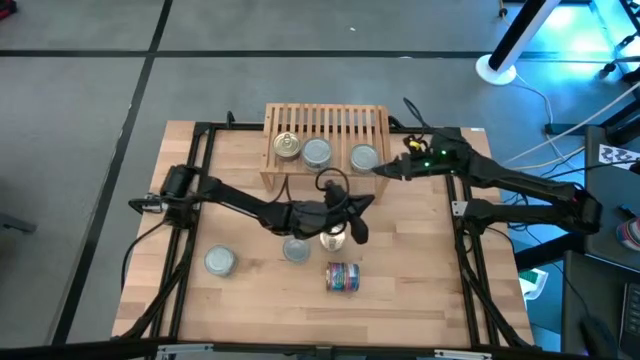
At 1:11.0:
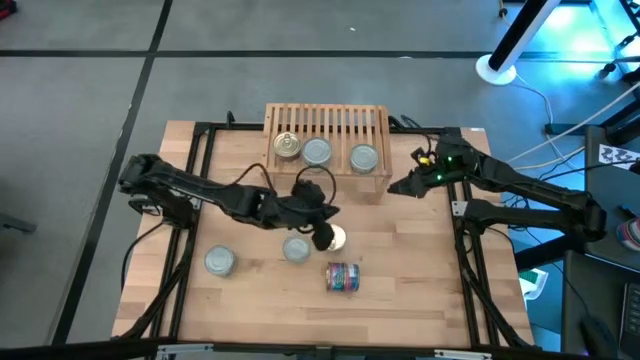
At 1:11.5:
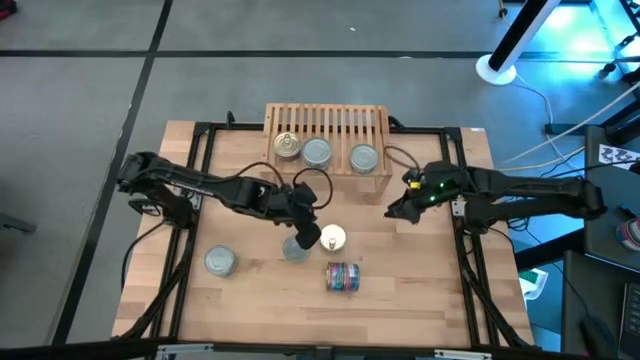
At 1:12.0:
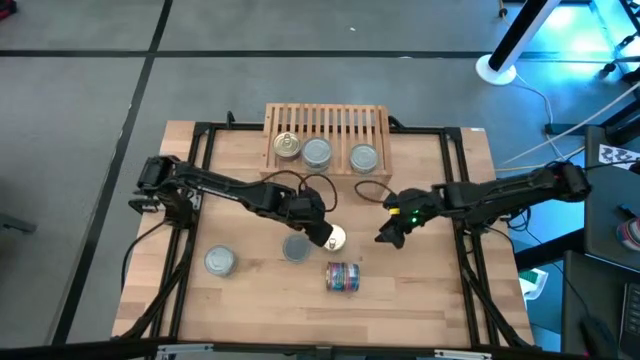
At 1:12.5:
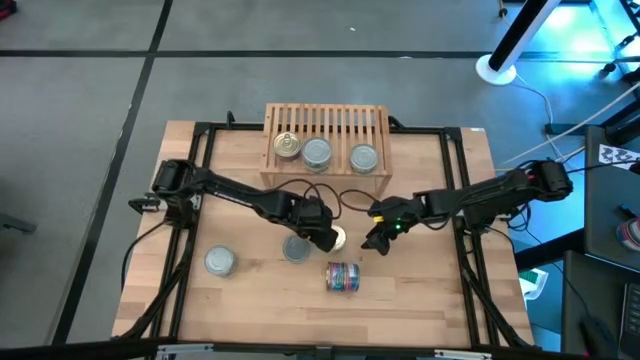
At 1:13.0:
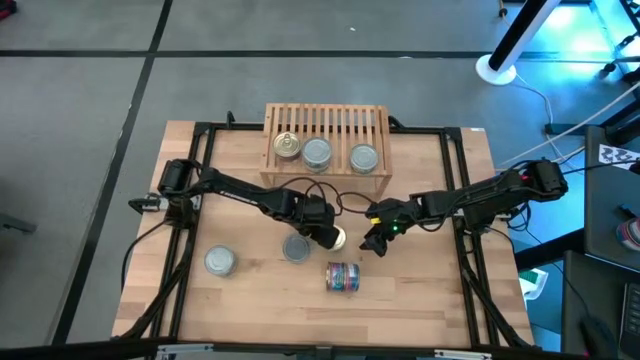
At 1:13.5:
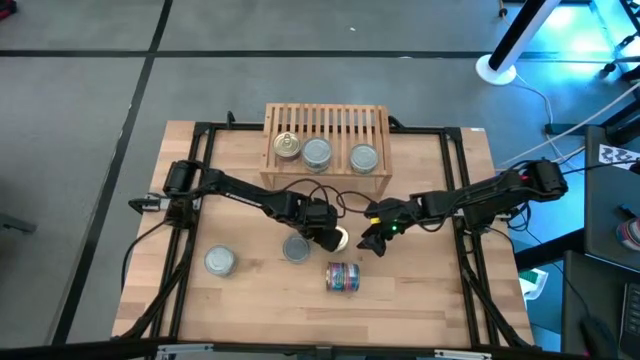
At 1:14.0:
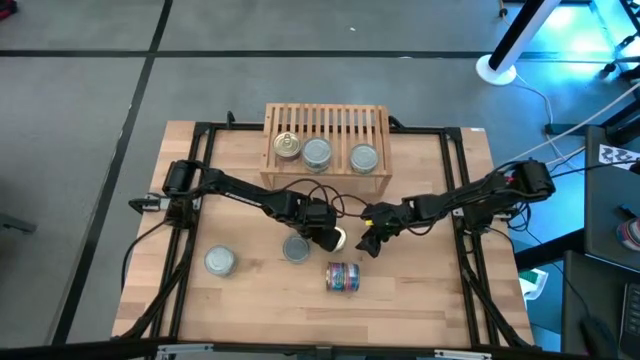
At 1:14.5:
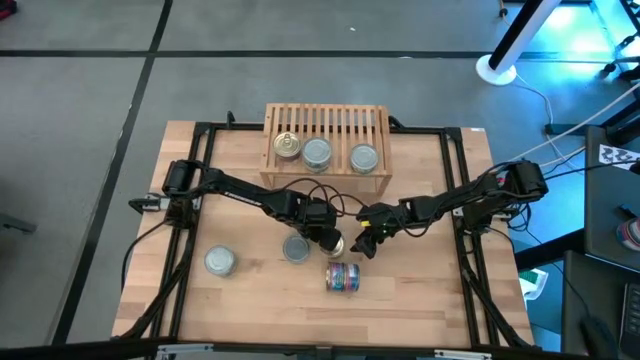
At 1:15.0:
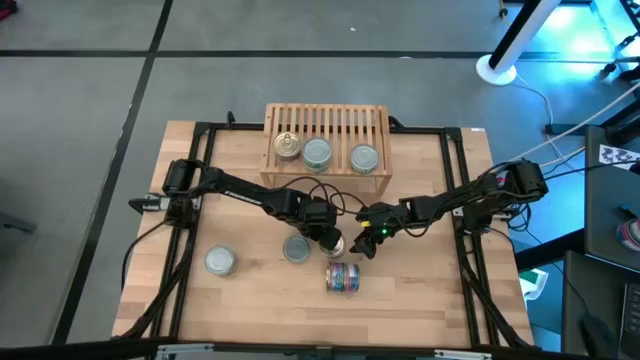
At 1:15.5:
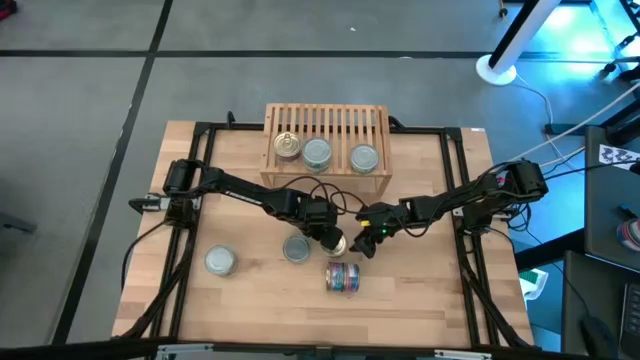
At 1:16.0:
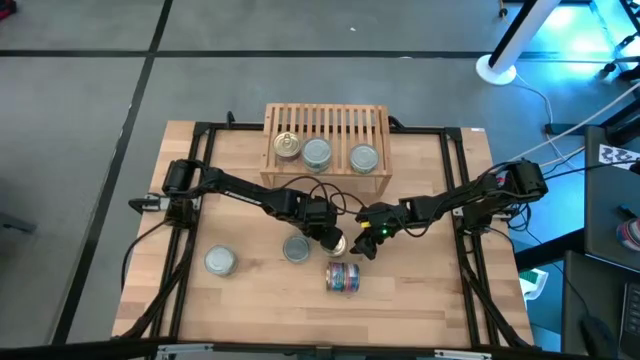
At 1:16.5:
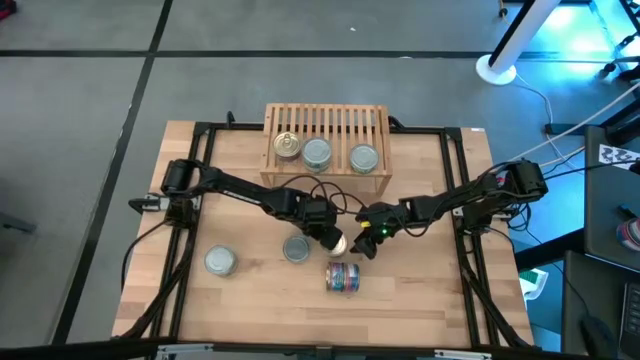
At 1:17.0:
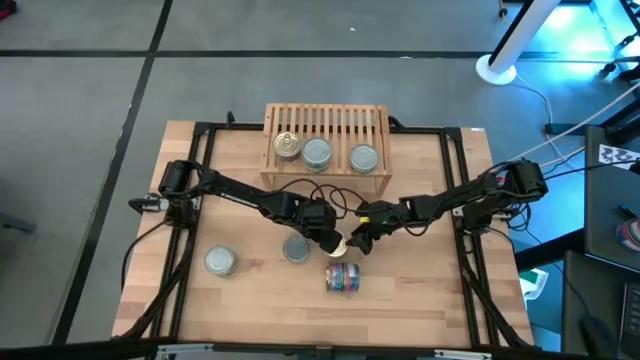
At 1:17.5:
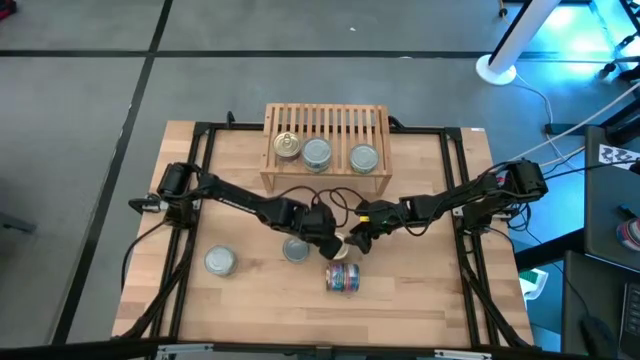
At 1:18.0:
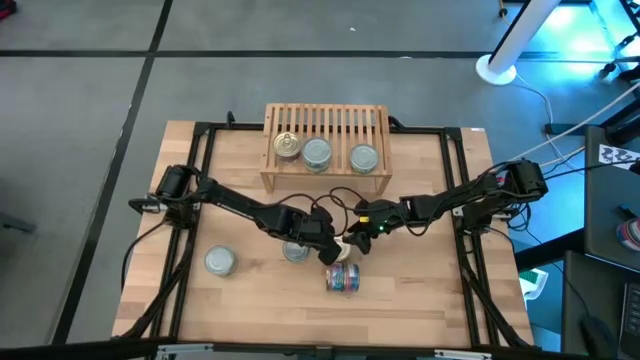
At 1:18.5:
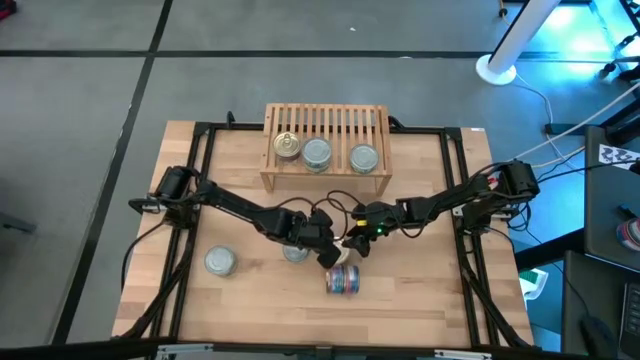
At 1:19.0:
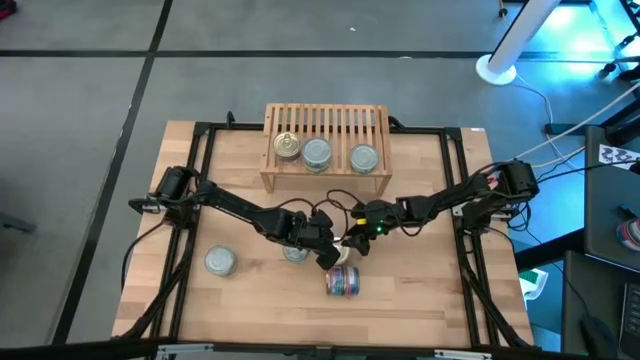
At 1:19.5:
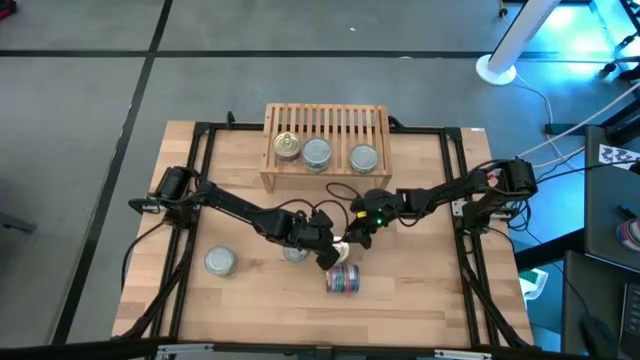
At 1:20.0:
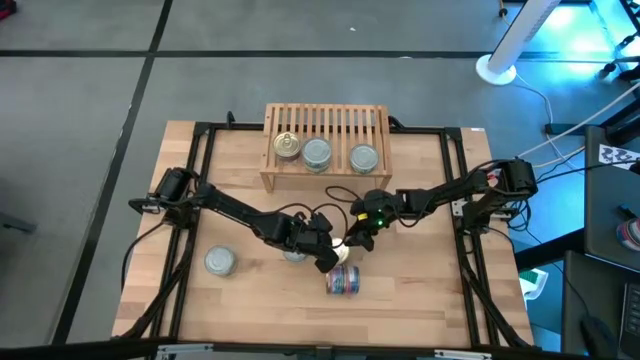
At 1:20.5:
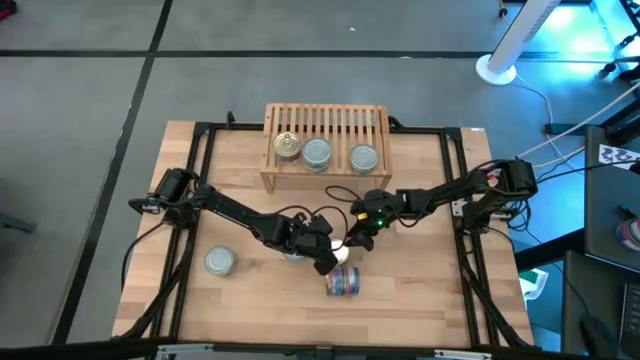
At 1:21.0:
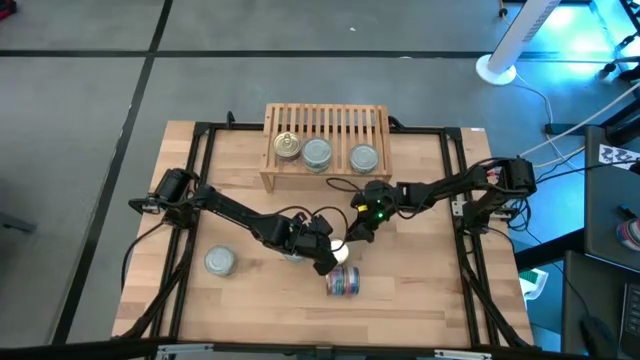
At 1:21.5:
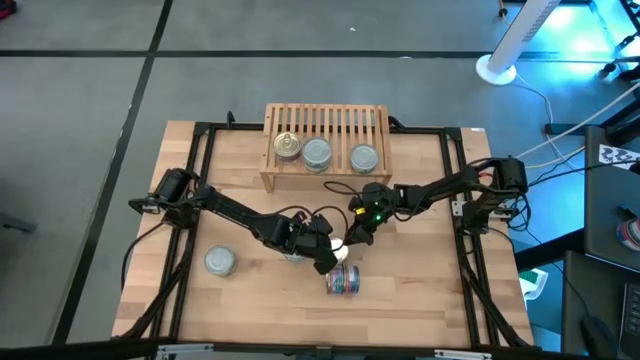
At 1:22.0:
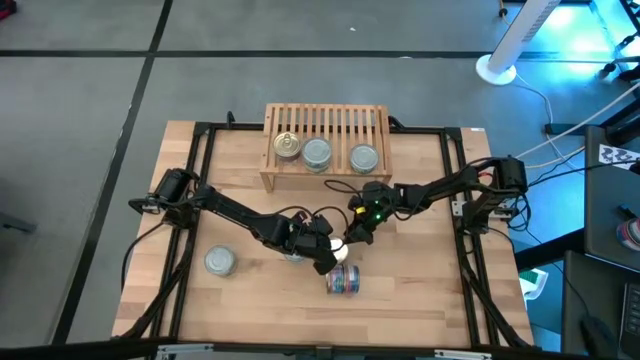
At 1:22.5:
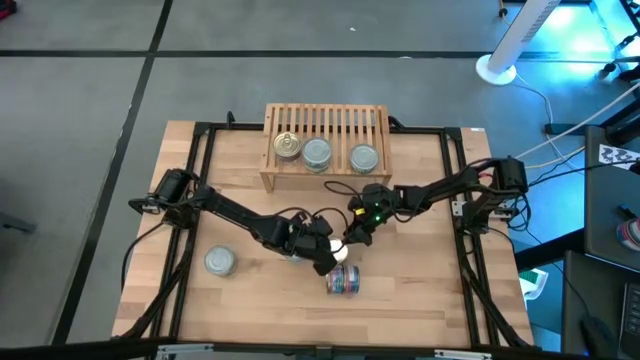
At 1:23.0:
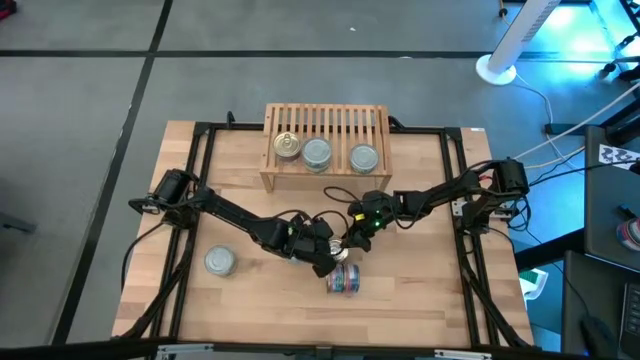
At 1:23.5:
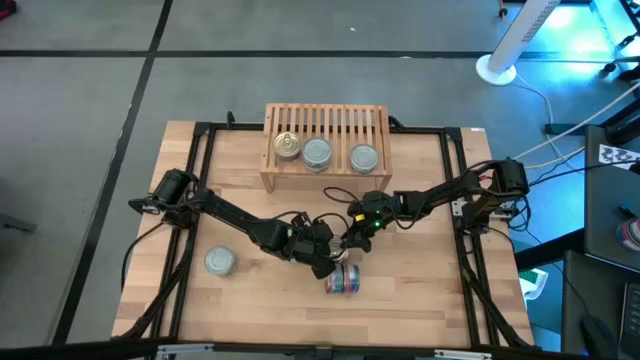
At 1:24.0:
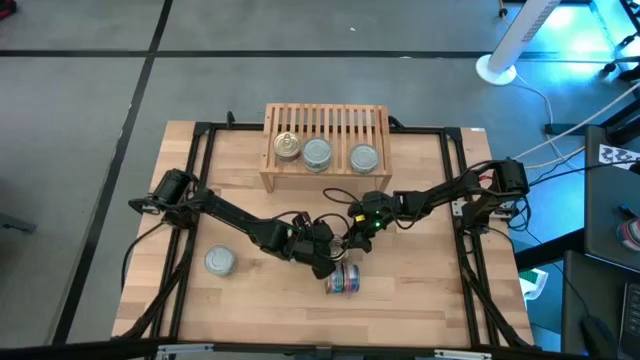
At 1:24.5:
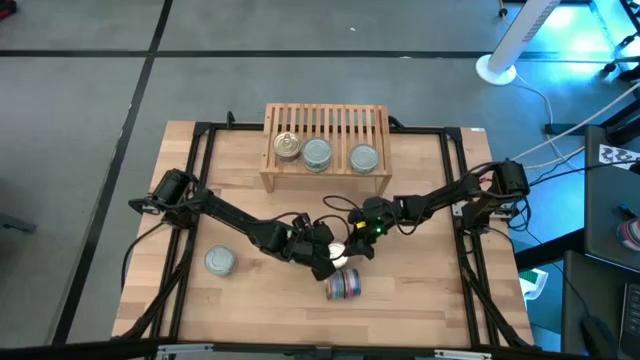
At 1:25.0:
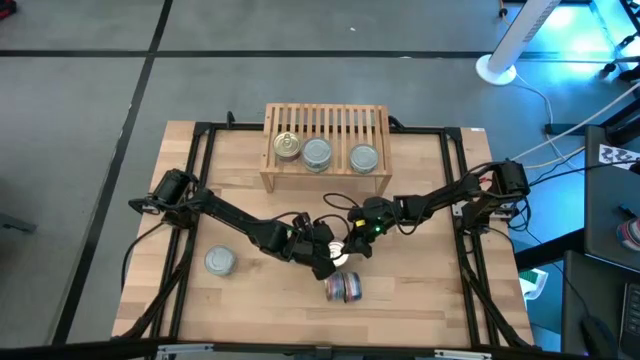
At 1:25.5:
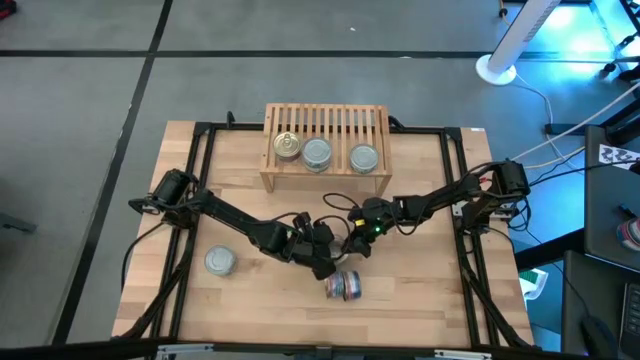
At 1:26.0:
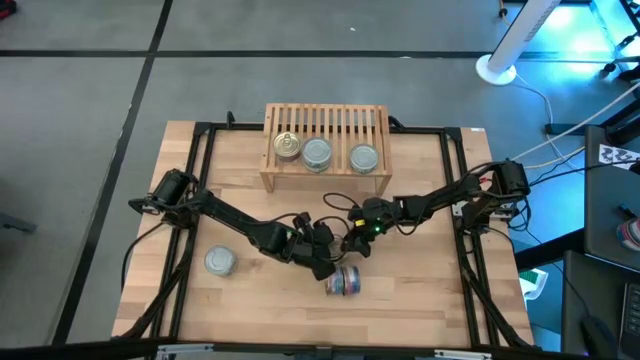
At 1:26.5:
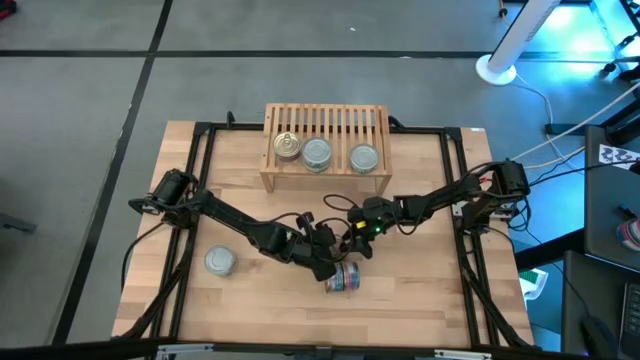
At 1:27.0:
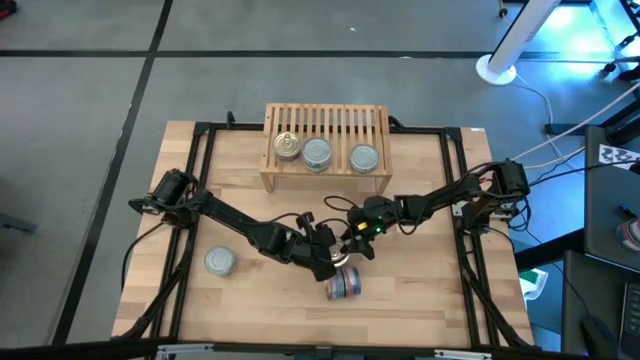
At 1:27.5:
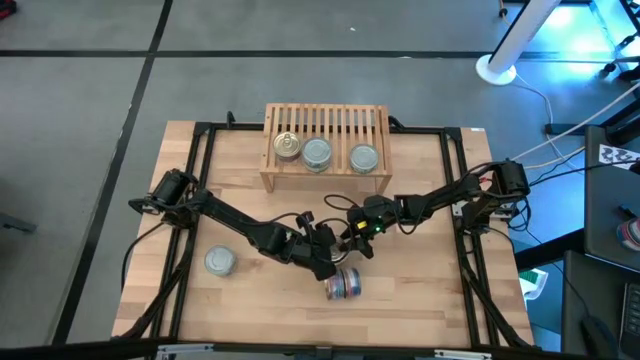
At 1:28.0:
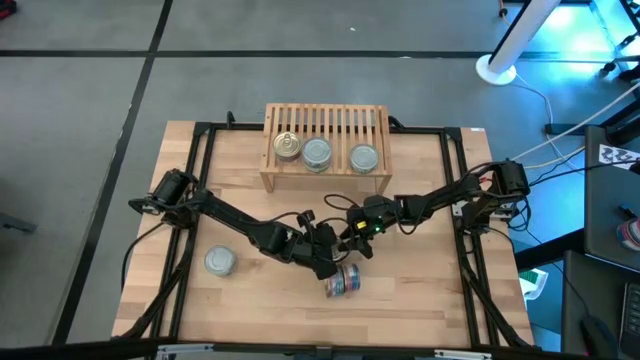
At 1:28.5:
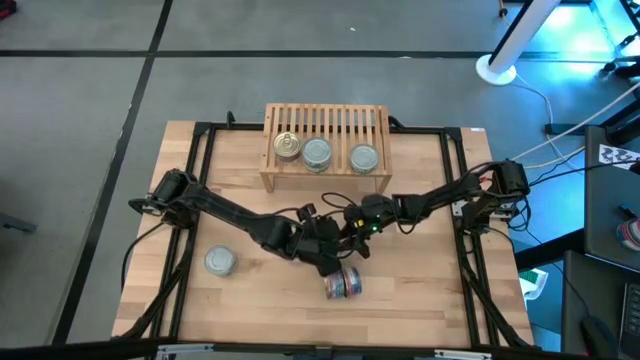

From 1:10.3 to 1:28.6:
Task: Stack canned seafood by type on shelf
Stack the blue-pink tuna can on top of the other blue-pink tuna can on the shelf

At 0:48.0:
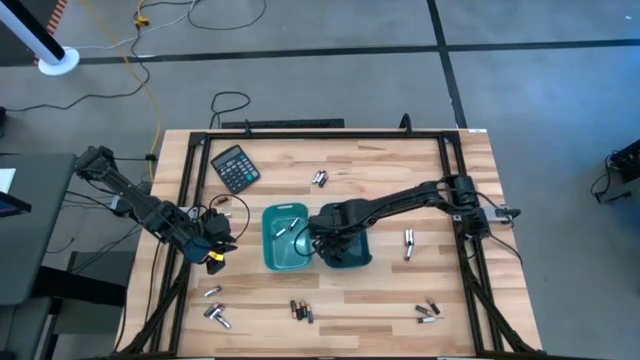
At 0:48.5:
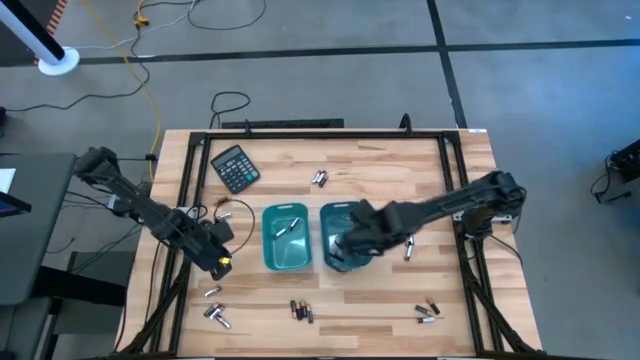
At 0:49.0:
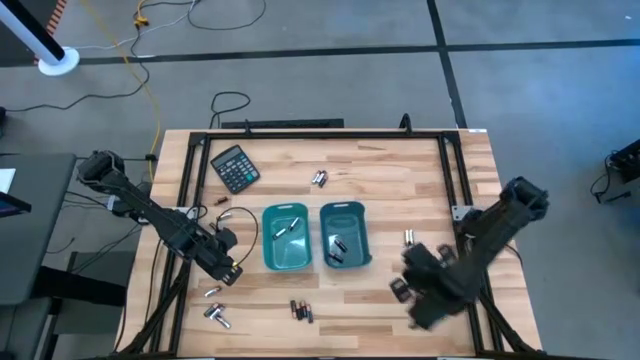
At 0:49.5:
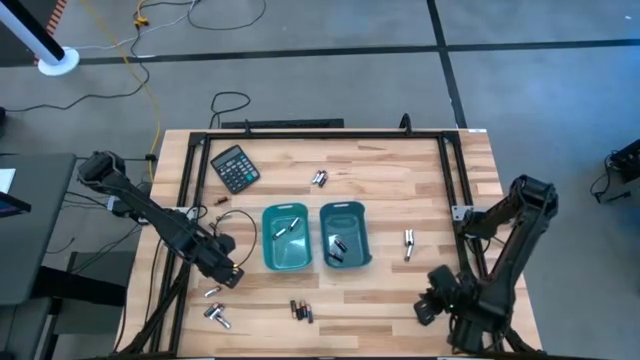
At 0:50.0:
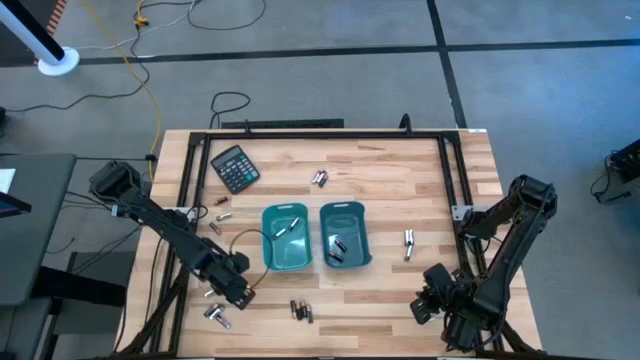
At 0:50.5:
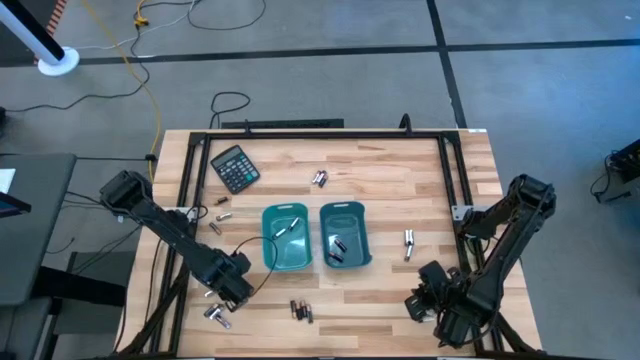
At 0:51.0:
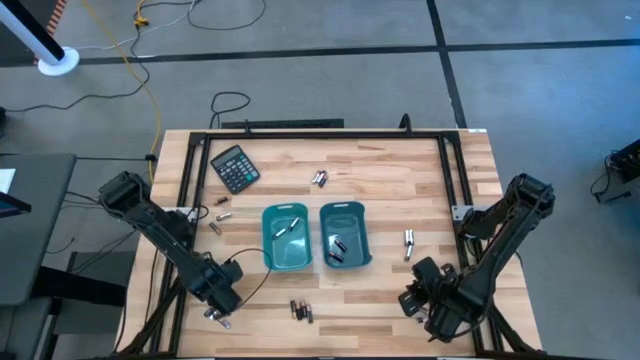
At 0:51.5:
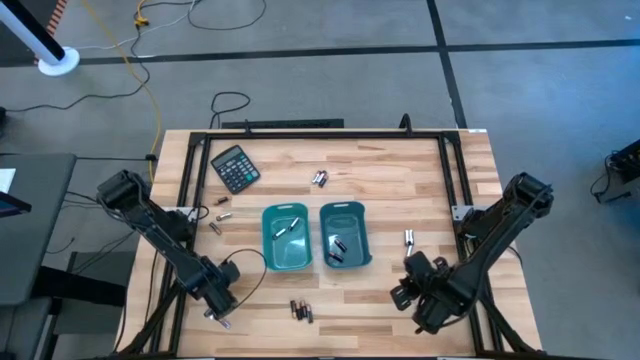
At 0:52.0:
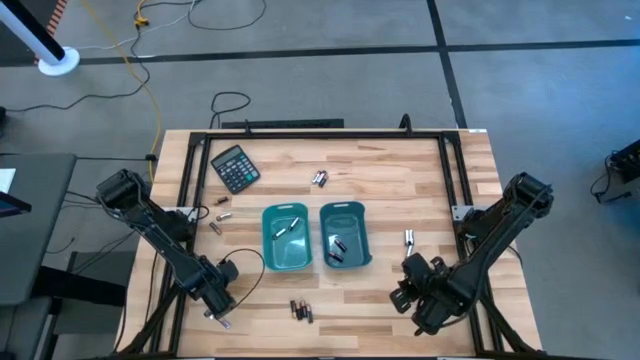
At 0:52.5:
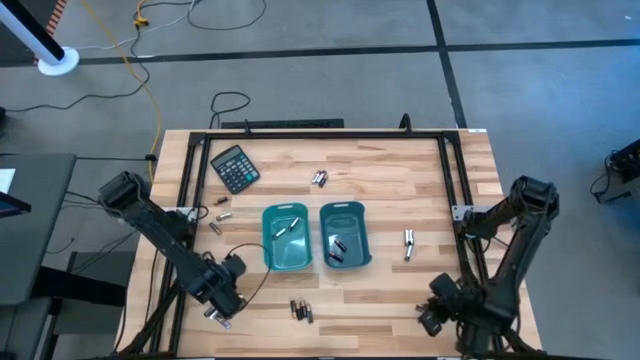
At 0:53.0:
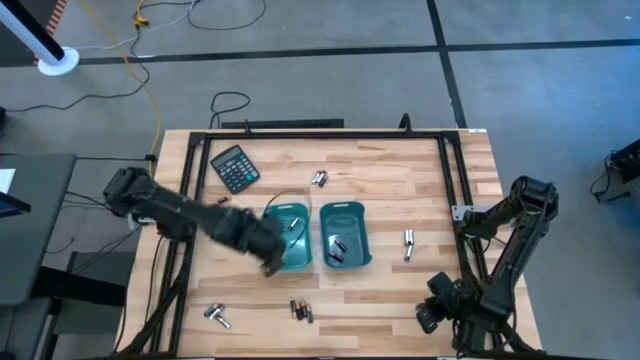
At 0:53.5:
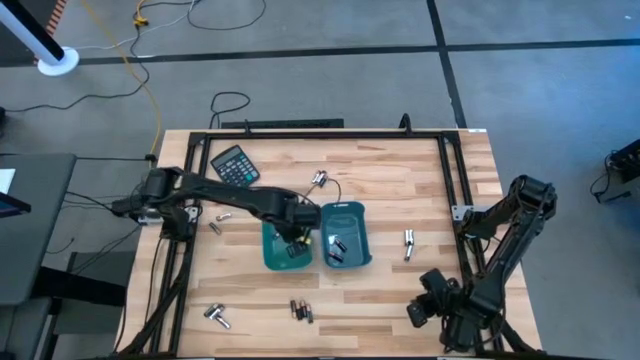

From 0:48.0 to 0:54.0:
Task: Sort batteries
Put the silver battery into the green bin
